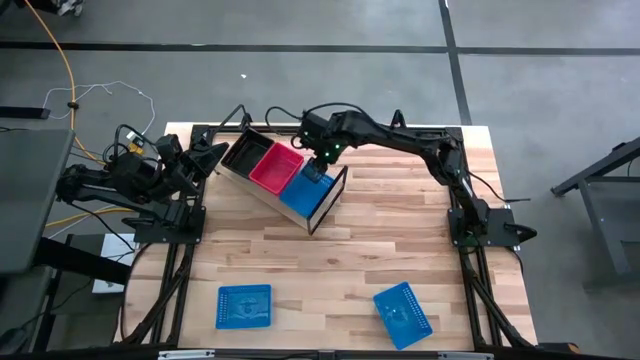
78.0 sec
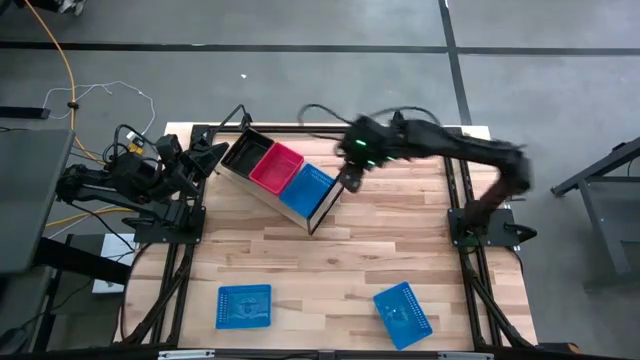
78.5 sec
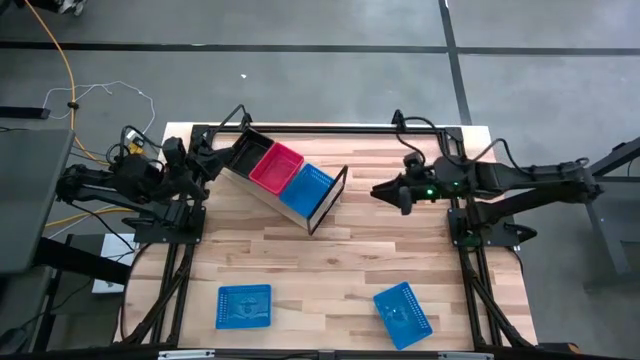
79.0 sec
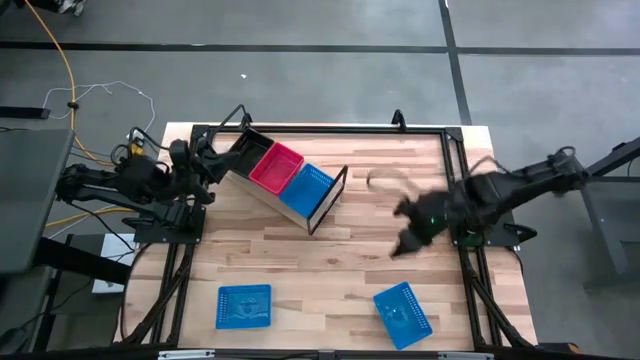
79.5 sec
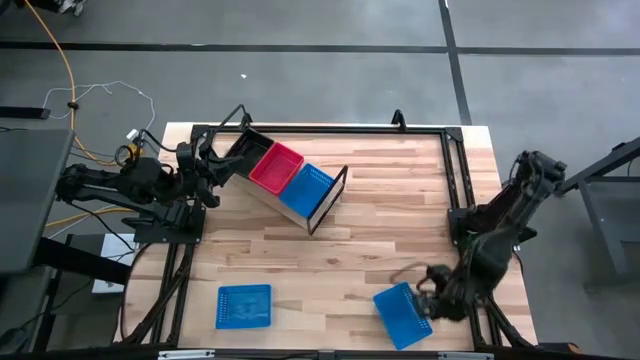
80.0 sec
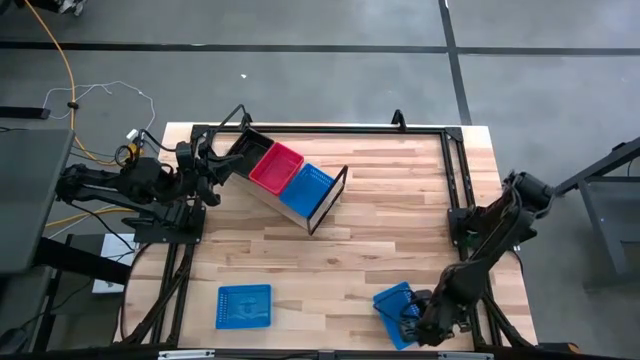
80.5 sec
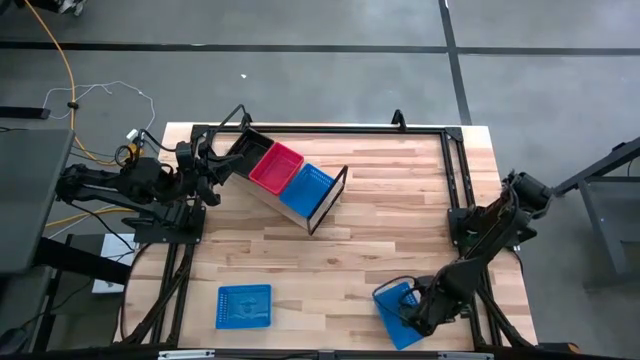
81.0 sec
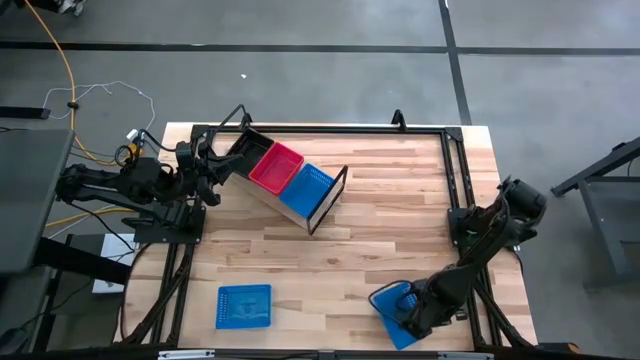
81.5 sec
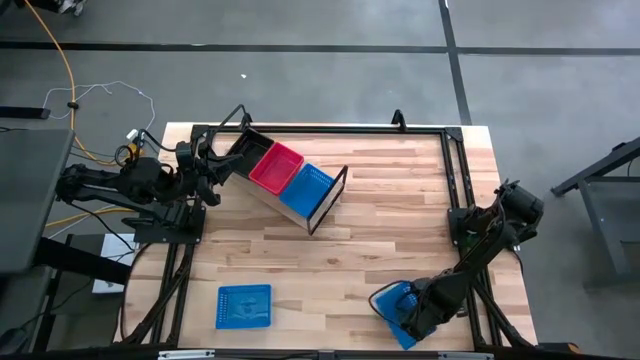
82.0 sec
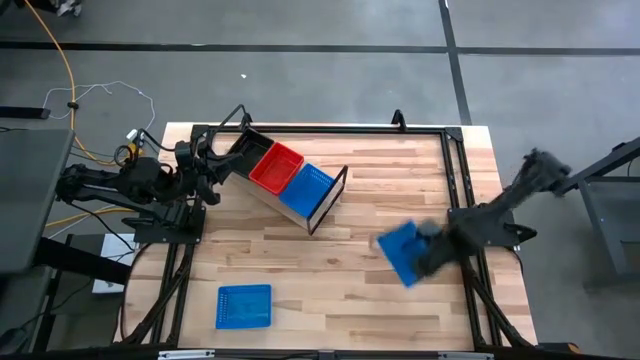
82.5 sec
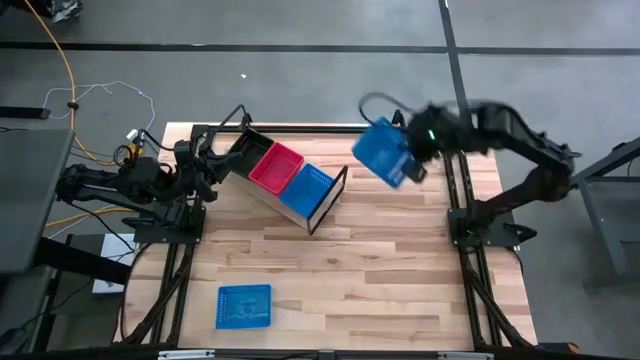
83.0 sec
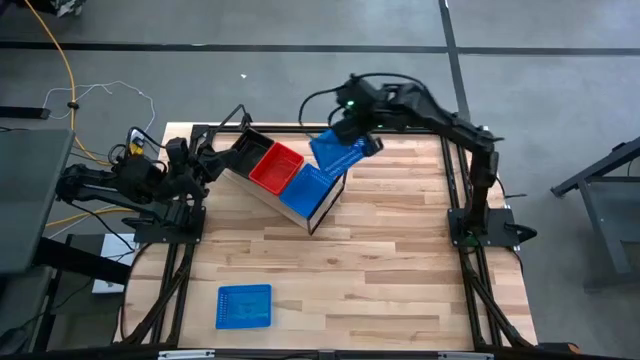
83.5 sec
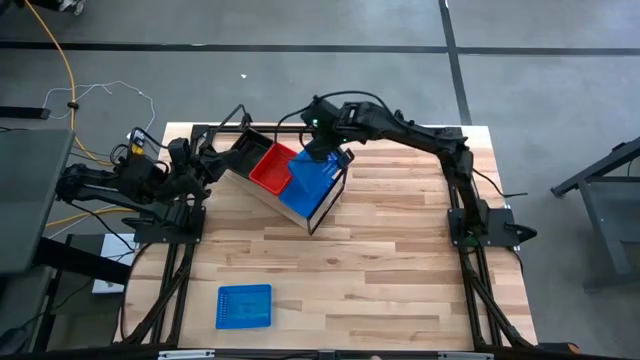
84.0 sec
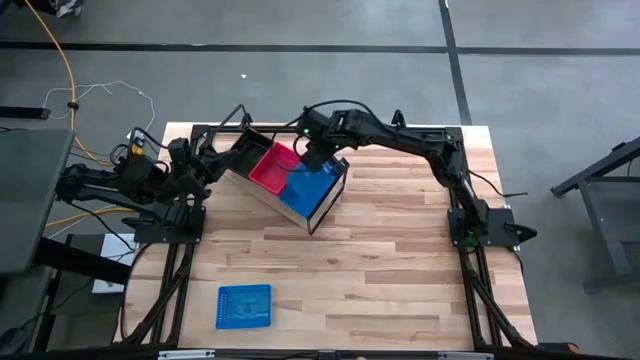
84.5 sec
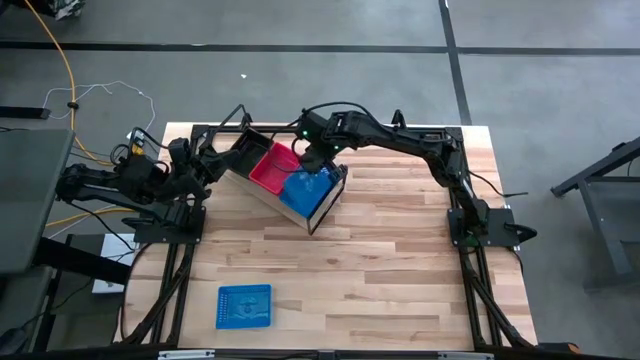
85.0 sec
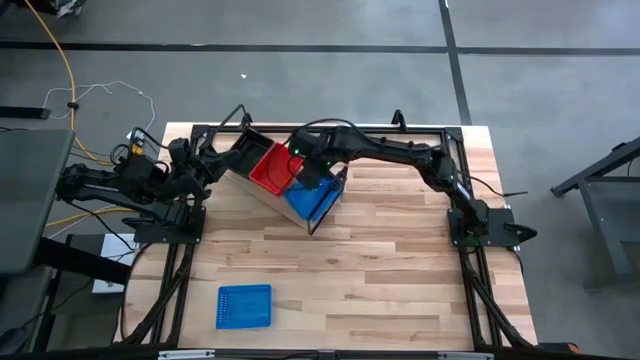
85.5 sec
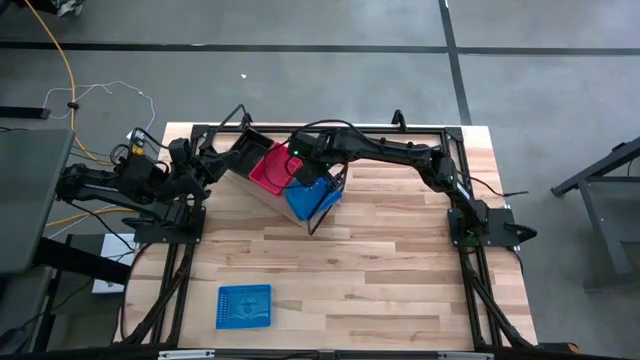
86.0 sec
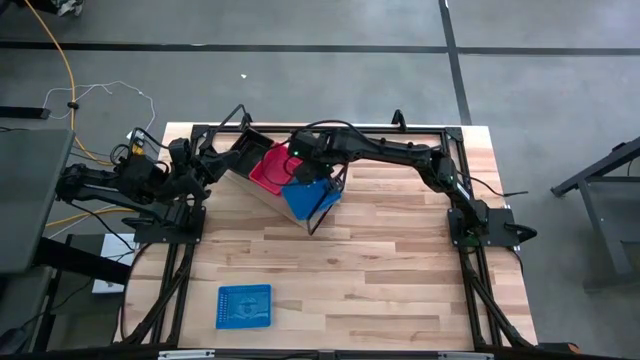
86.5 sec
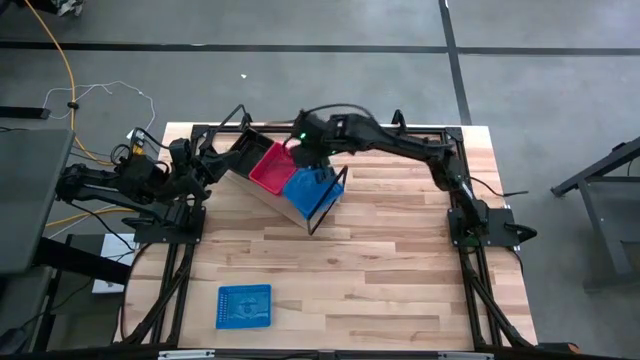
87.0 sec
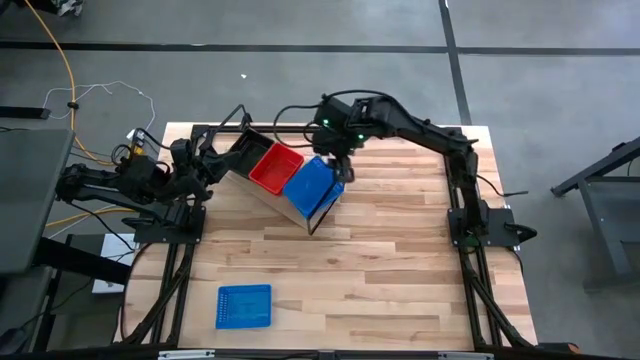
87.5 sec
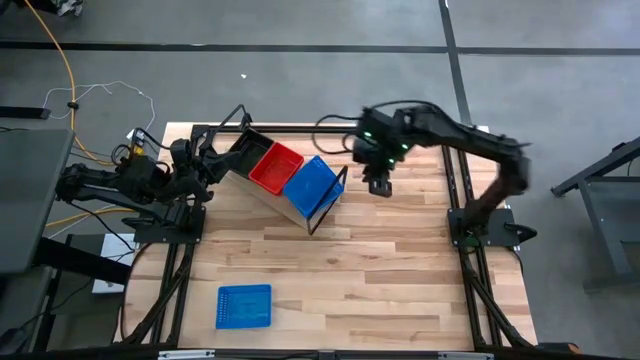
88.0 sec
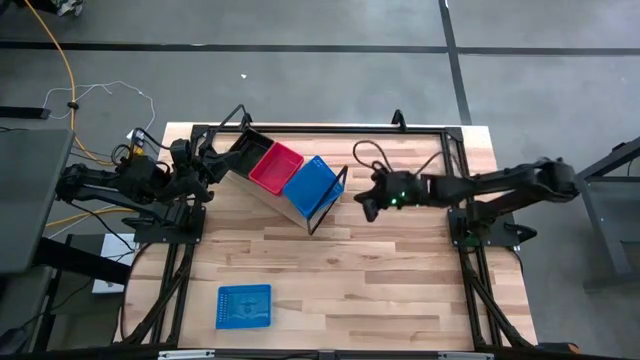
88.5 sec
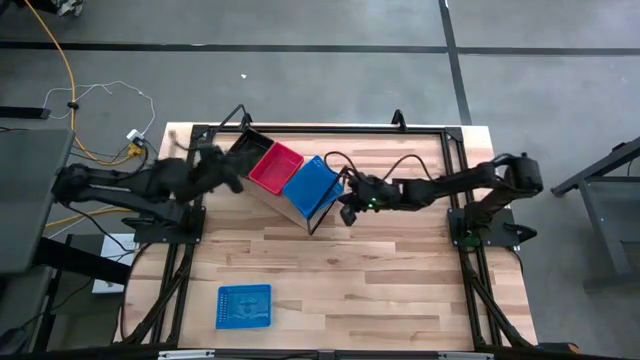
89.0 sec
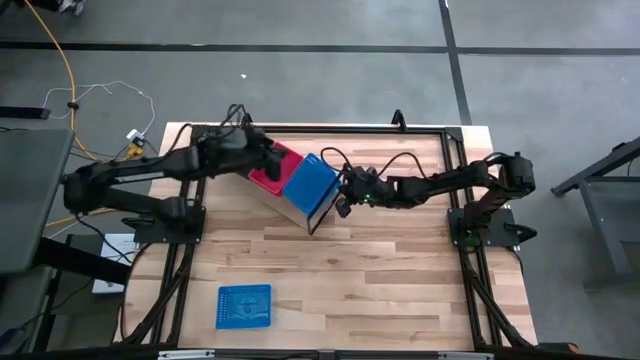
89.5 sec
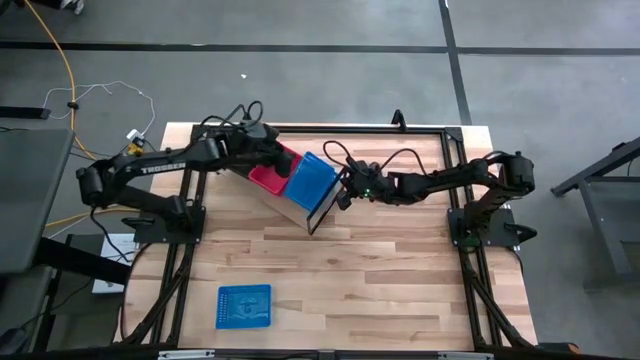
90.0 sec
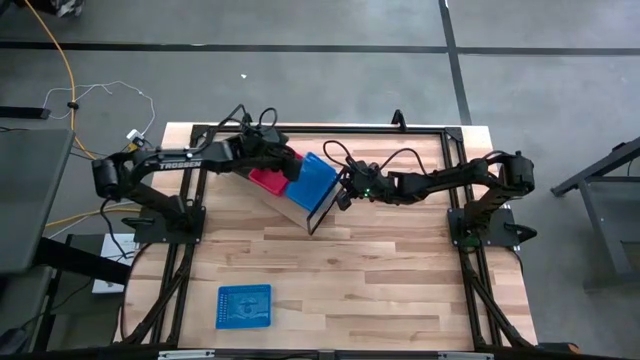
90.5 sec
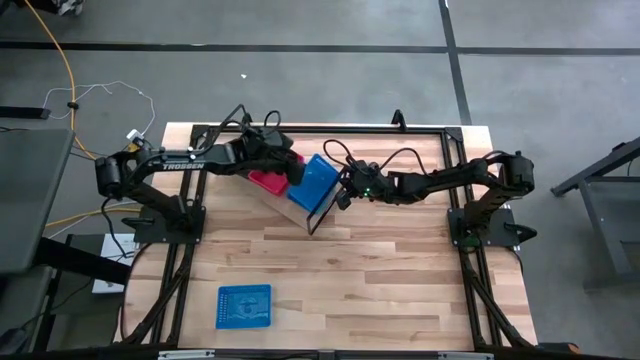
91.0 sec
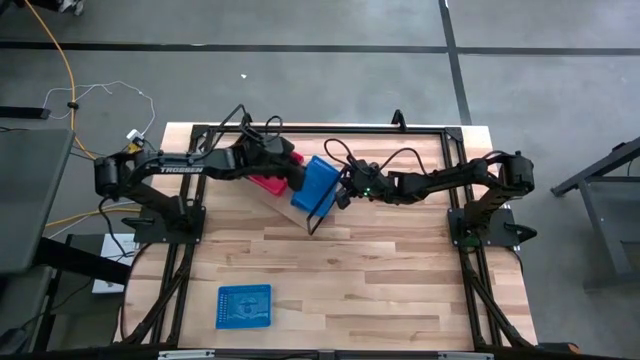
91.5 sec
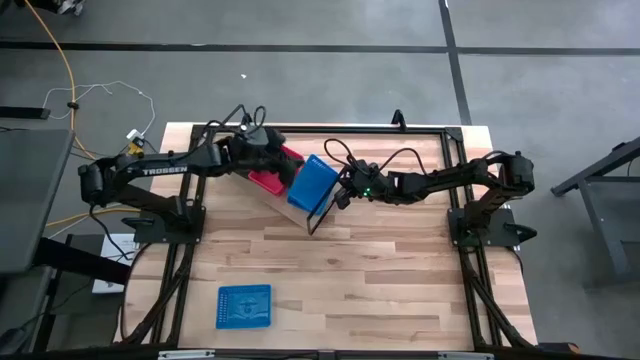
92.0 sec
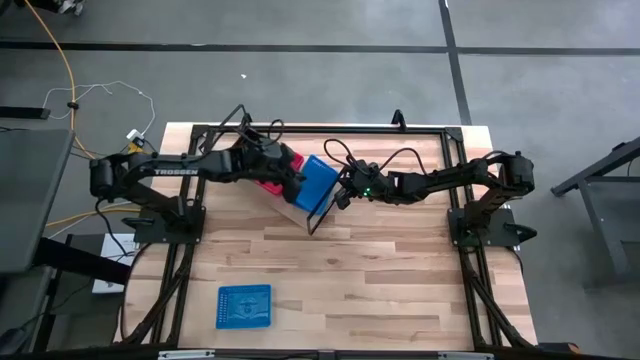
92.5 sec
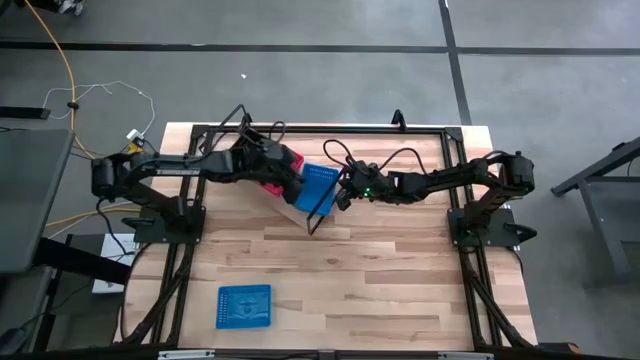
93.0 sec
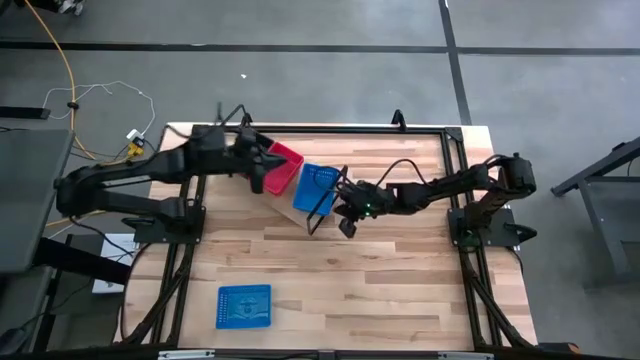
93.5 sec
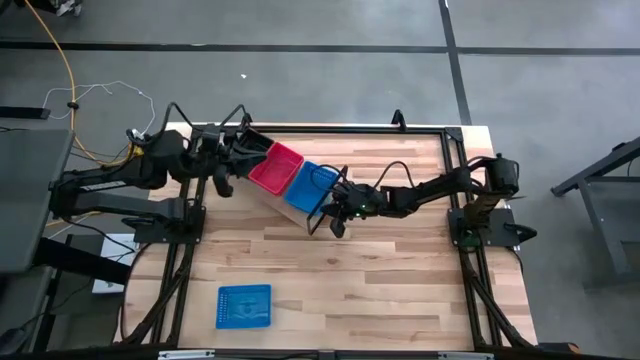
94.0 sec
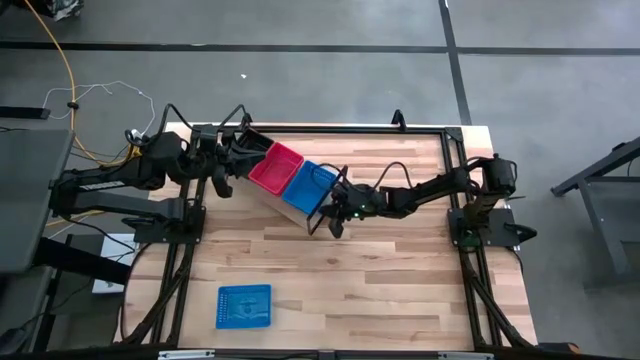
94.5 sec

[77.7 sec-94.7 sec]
Task: Stack baskets on shelf by color
Stack the right blue bin into the blue bin on the shelf

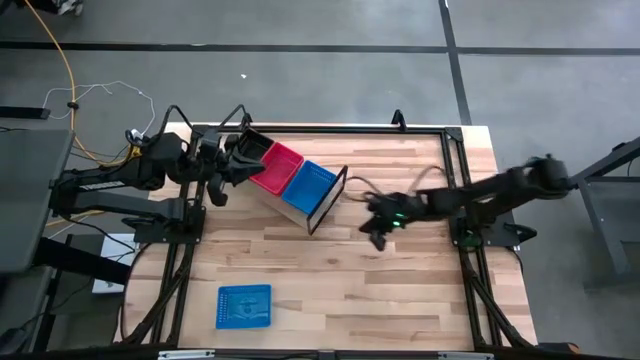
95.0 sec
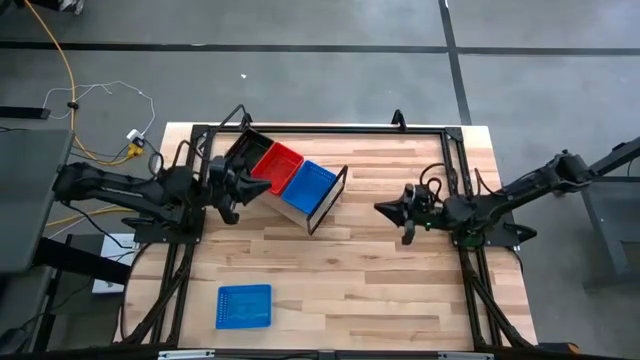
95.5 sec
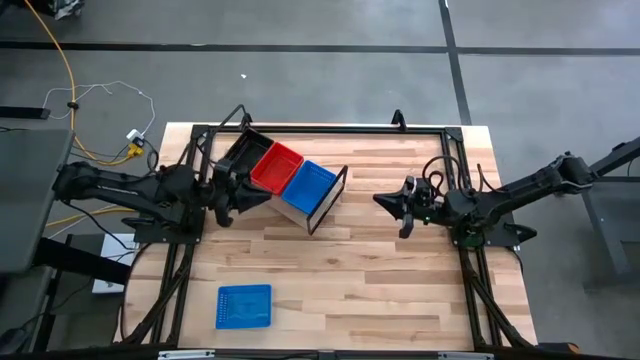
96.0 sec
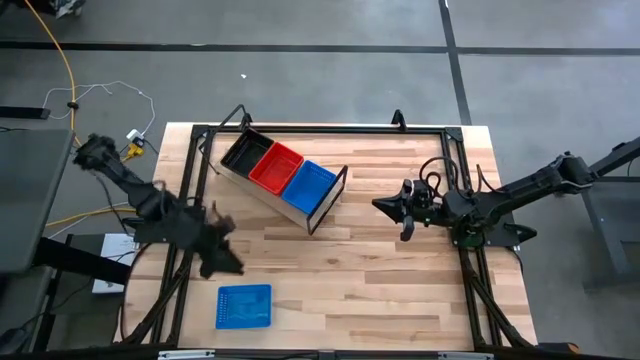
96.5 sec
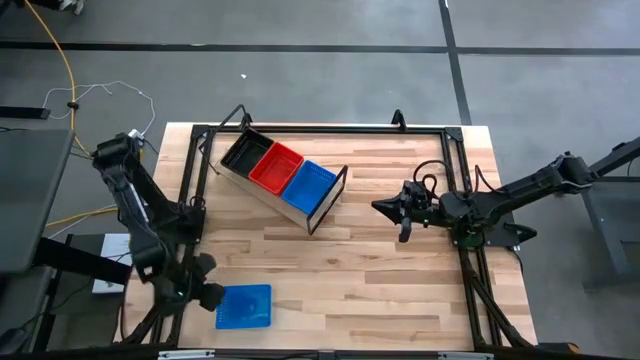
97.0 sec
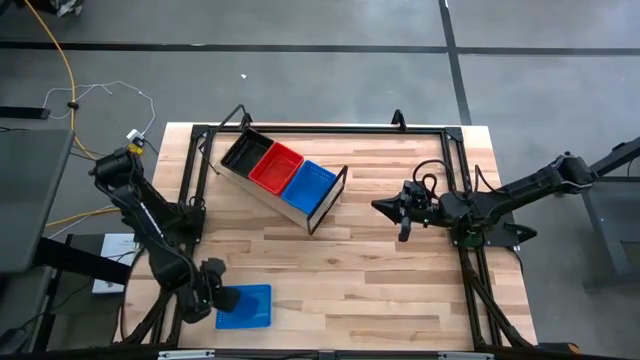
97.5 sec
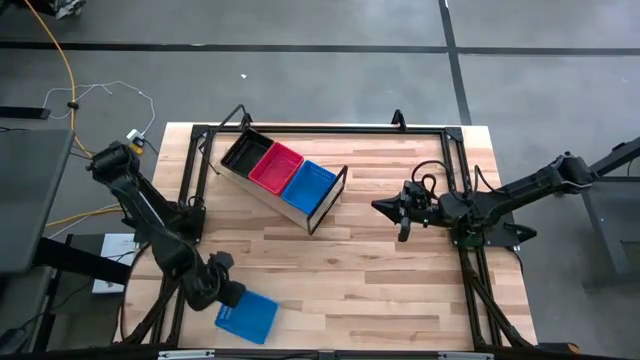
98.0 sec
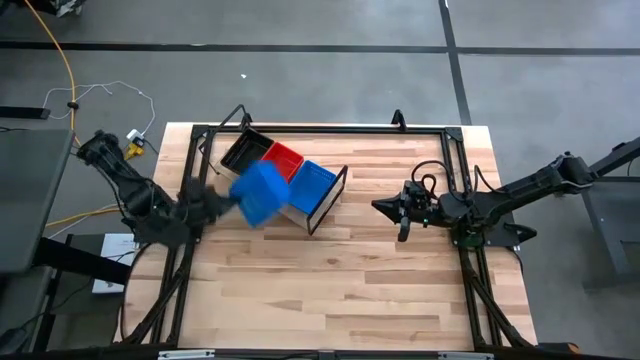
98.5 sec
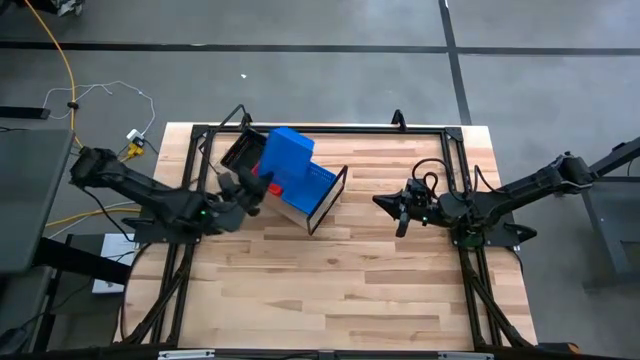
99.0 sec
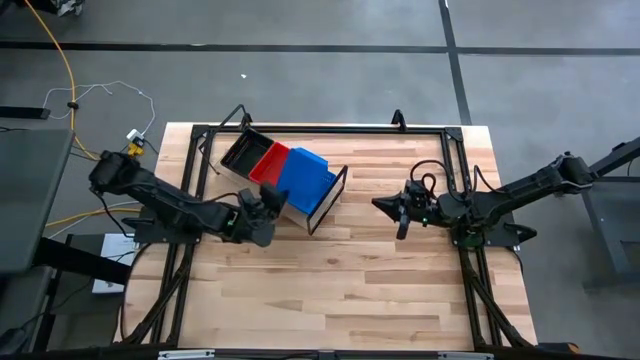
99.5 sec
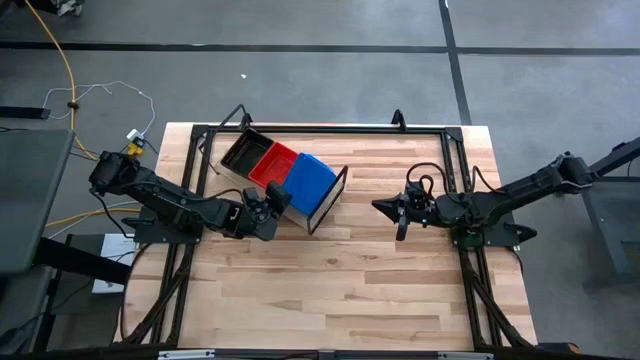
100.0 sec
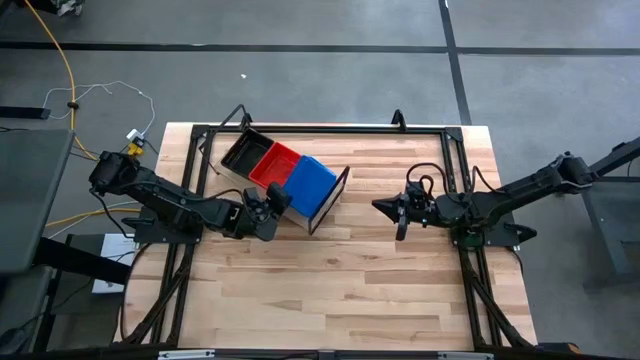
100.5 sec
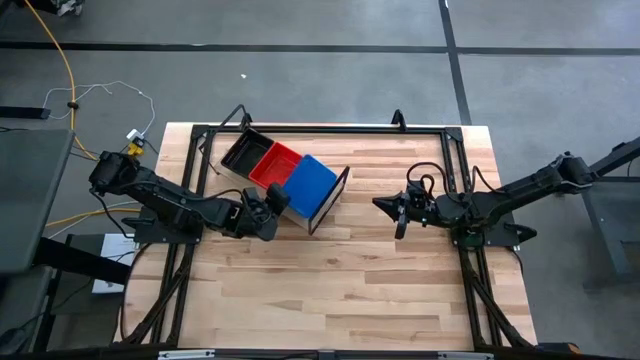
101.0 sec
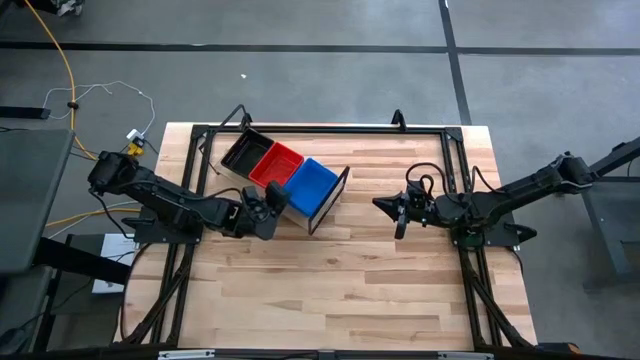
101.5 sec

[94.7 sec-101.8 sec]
Stack the blue bin into the blue bin on the shelf
